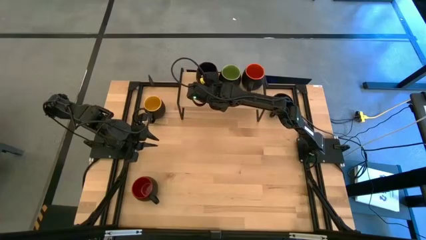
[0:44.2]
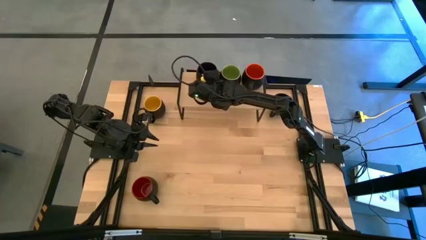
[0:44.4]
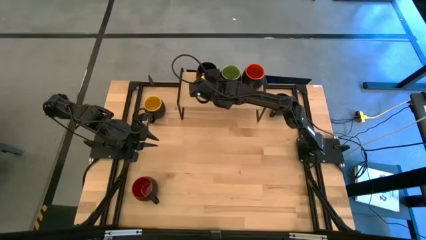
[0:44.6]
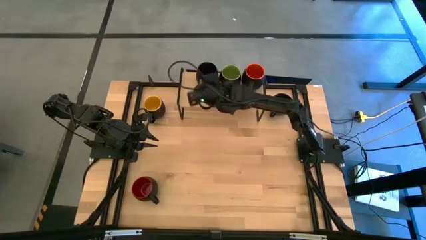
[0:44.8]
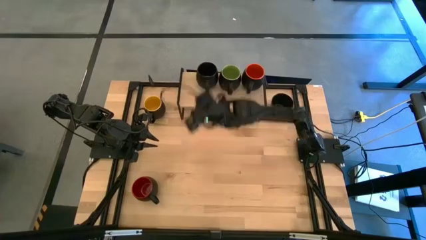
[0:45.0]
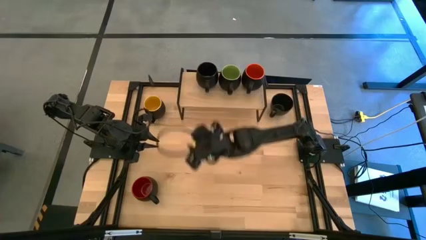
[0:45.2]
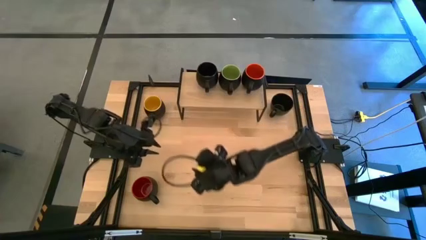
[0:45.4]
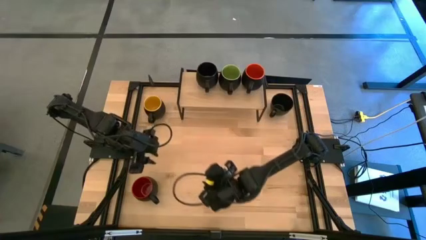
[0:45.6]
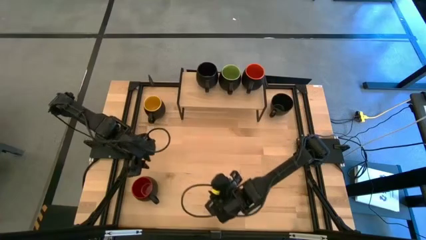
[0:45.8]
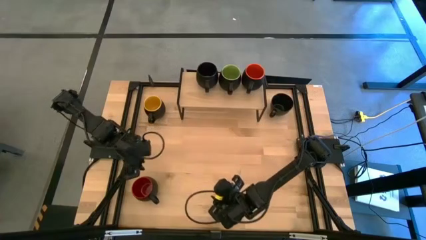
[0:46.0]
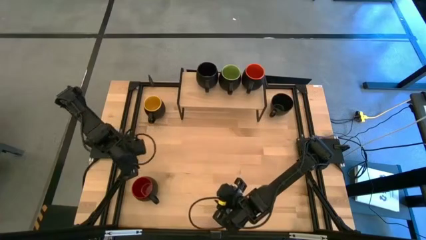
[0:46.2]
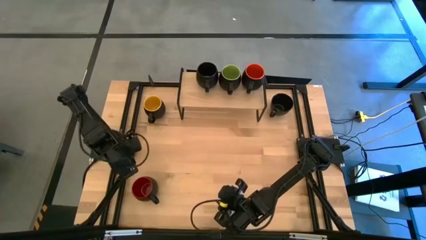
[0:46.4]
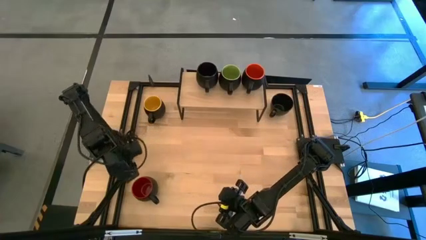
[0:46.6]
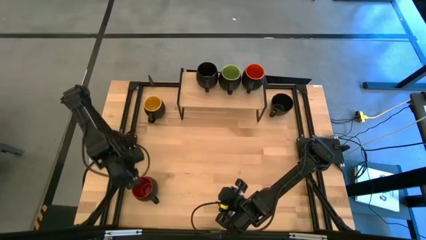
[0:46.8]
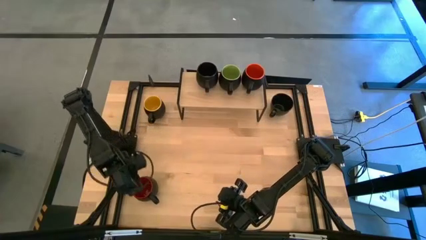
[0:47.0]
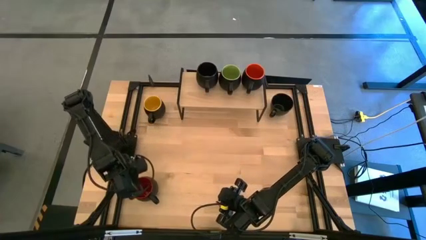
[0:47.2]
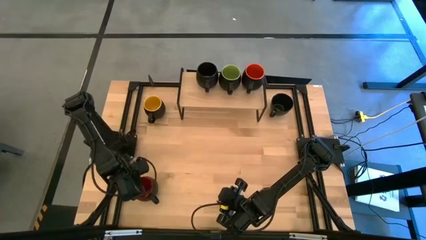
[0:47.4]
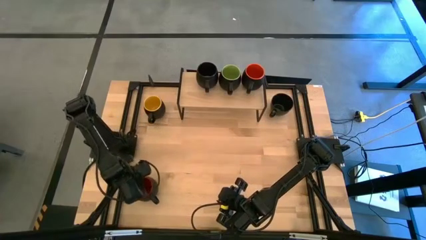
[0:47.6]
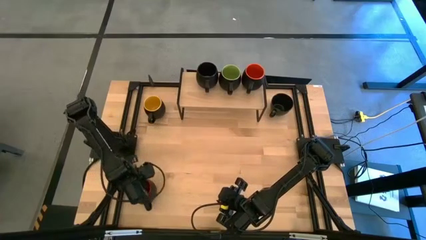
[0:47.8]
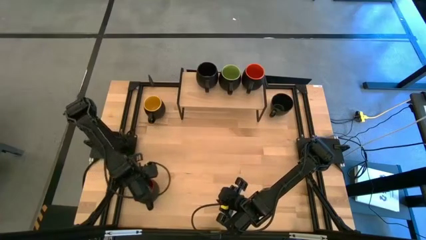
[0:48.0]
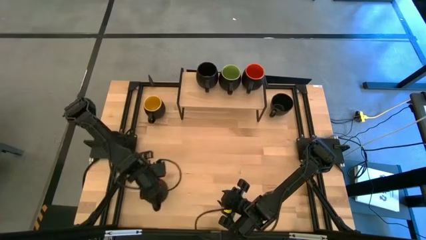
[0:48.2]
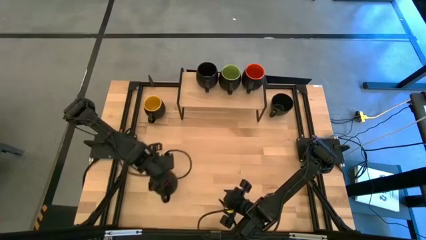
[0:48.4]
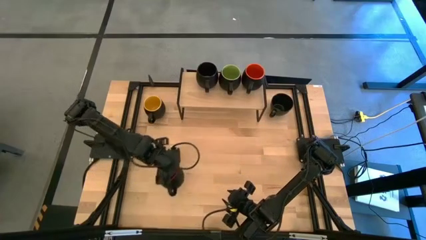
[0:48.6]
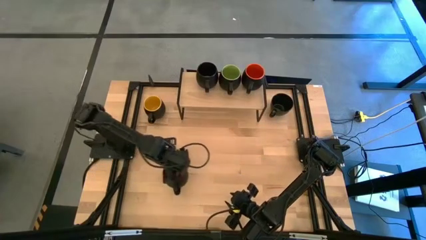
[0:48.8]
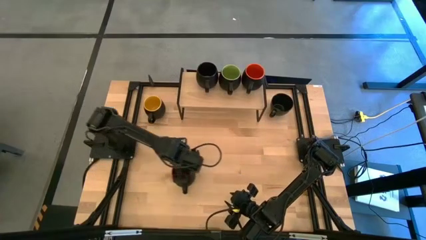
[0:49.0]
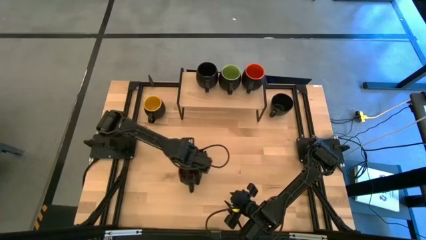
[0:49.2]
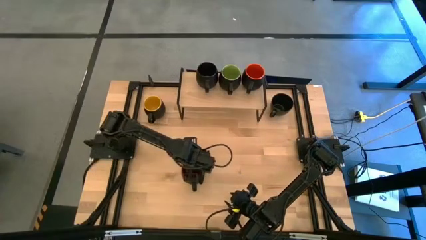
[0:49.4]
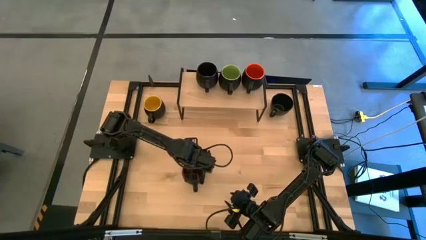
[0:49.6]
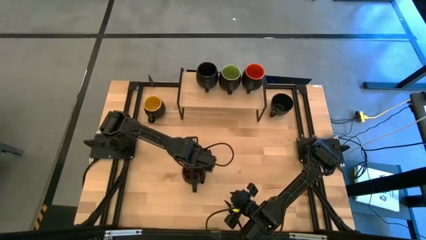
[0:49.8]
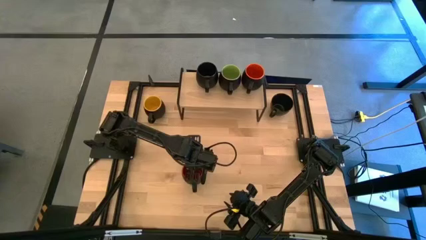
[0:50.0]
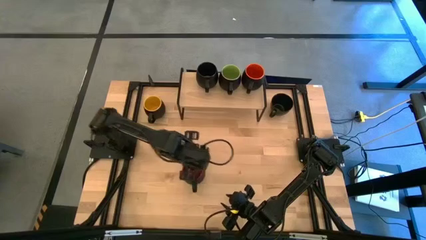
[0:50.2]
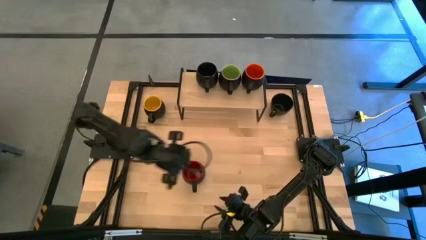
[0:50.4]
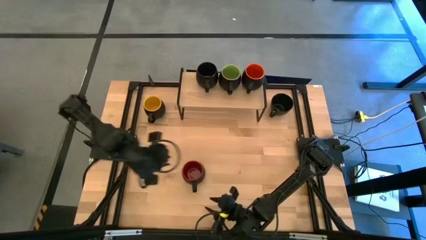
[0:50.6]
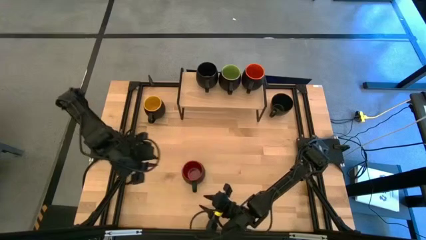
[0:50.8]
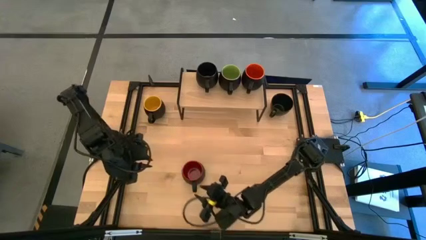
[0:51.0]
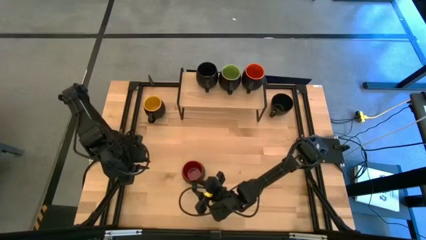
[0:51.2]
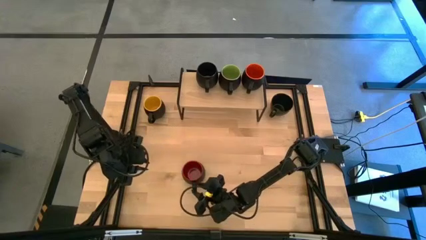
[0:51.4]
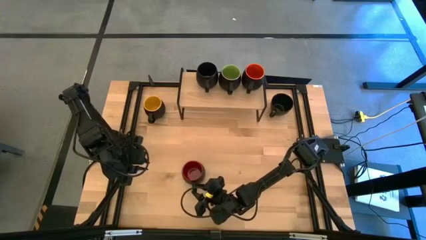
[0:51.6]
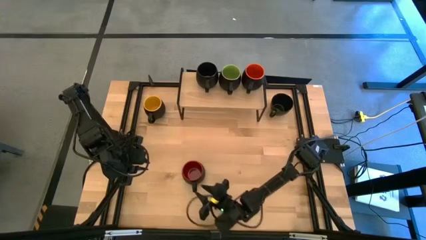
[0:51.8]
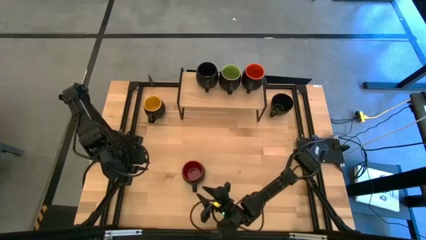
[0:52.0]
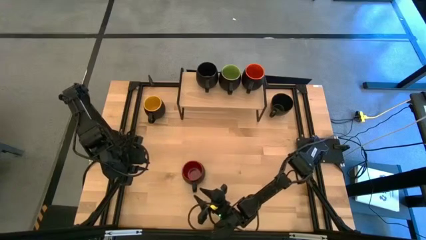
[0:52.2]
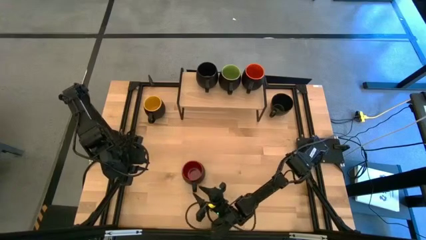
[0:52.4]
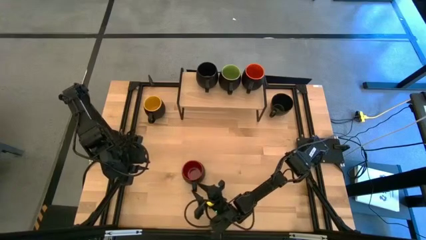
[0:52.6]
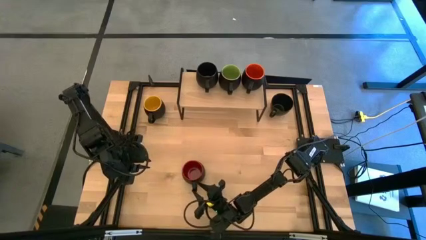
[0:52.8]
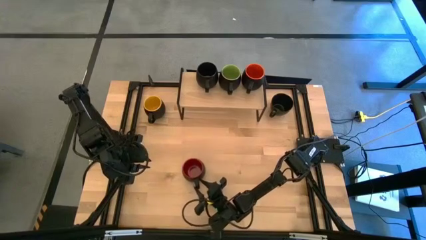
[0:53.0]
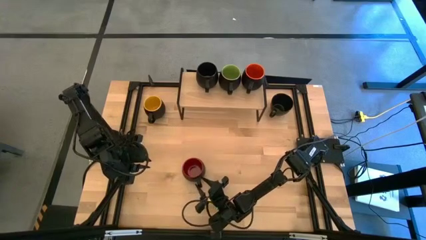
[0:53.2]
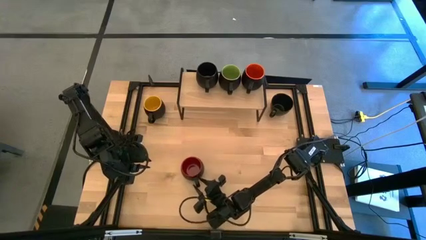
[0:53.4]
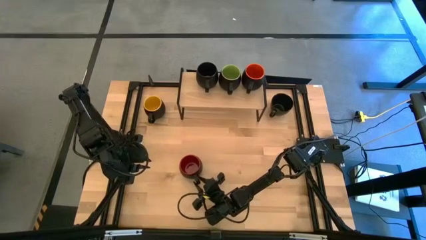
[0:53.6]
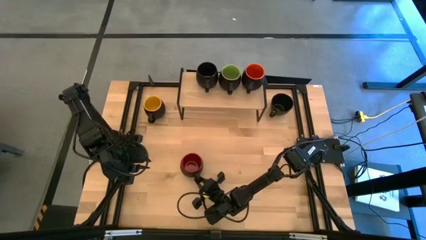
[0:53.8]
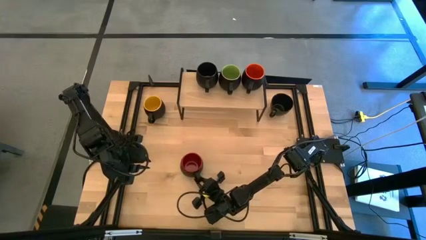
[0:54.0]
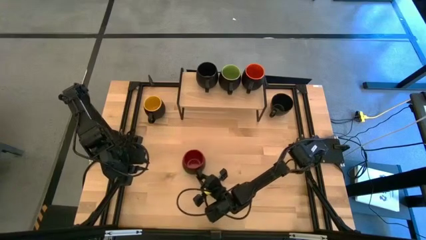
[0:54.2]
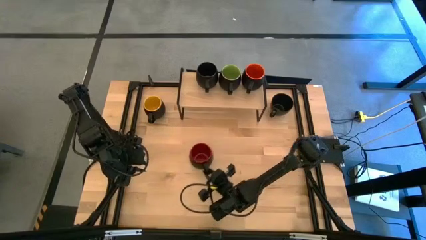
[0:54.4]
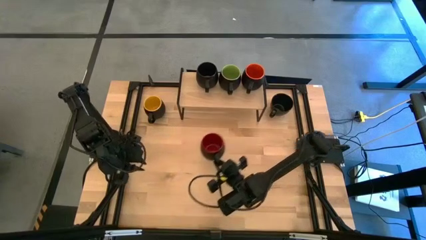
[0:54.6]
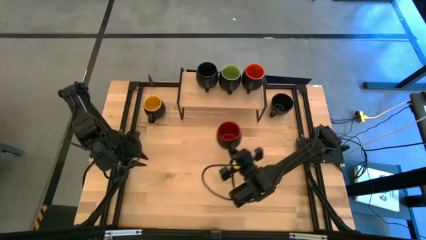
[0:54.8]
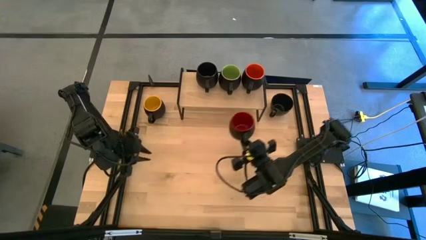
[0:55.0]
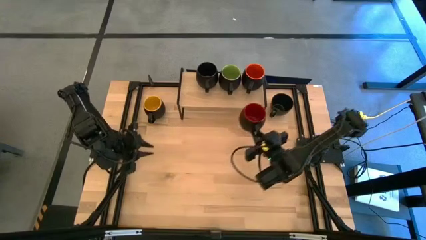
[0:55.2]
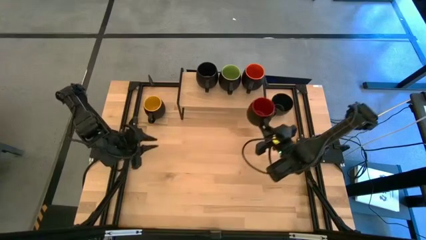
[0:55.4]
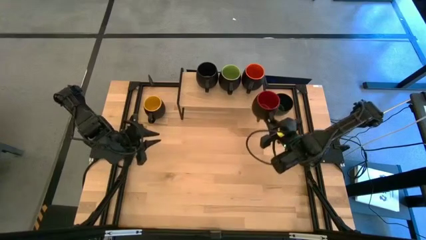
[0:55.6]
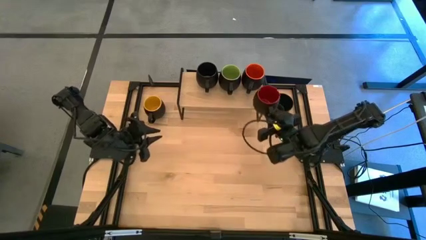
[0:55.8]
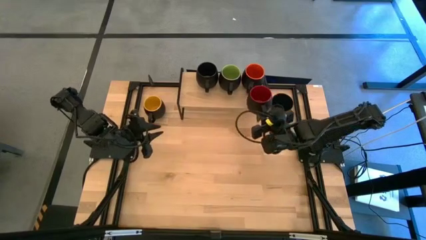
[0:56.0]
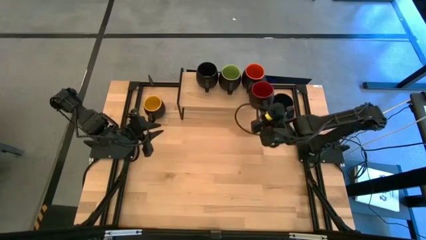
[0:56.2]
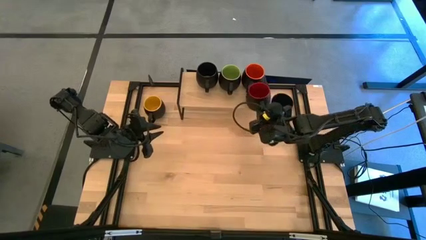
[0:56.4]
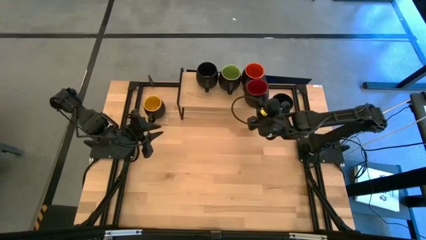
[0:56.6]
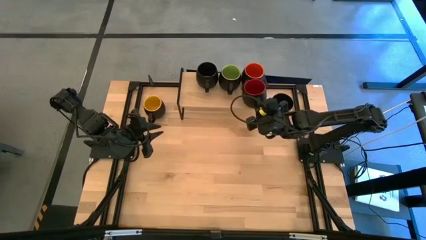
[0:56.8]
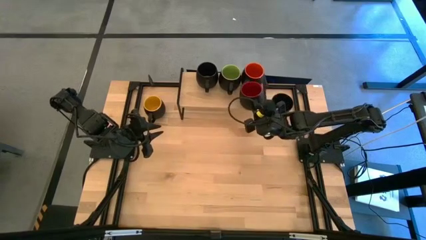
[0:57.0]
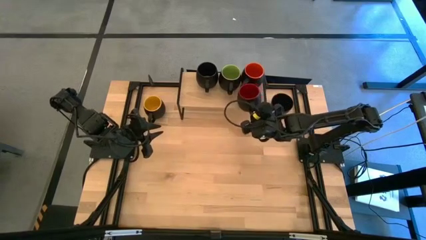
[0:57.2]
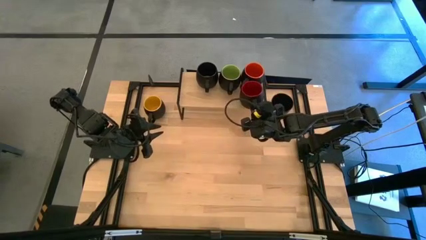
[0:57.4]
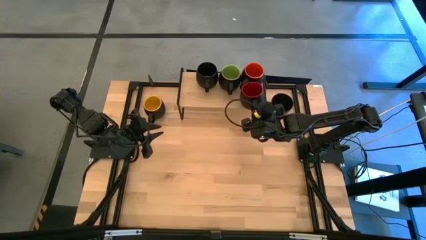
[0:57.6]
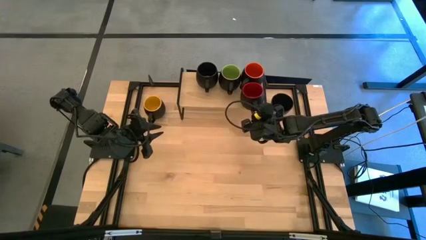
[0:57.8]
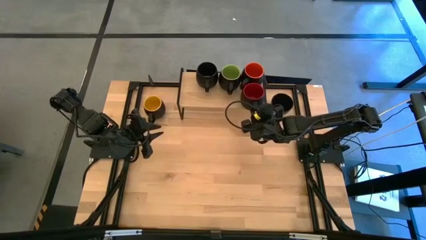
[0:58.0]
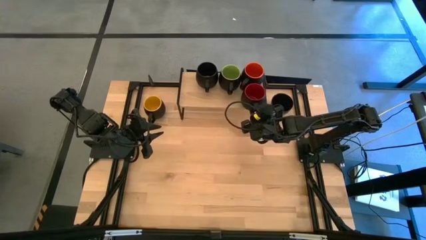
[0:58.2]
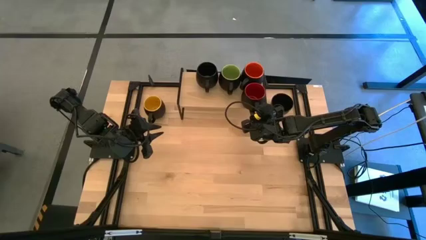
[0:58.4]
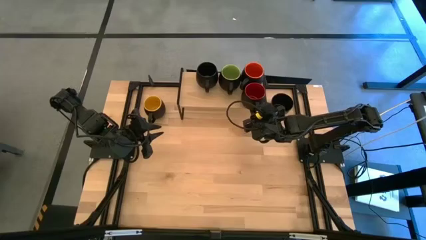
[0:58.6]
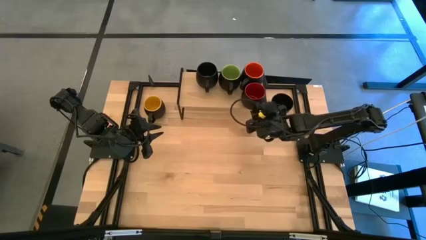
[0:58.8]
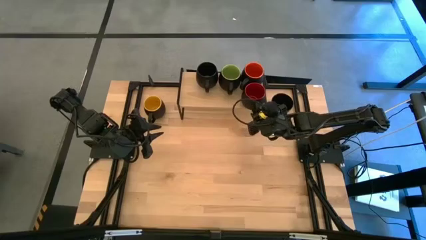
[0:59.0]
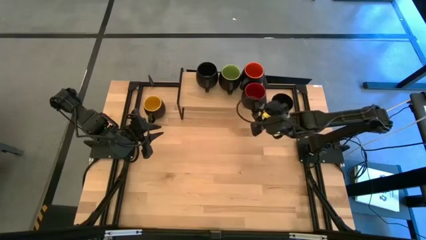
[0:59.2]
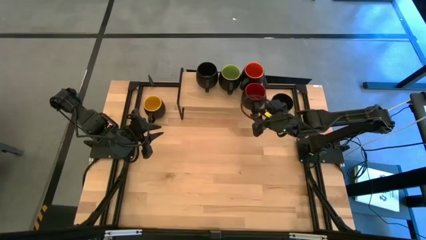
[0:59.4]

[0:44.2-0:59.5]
Task: Place coffee mugs
Put the red mug on the shelf

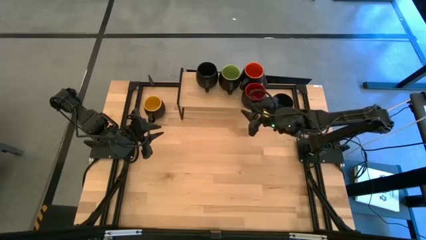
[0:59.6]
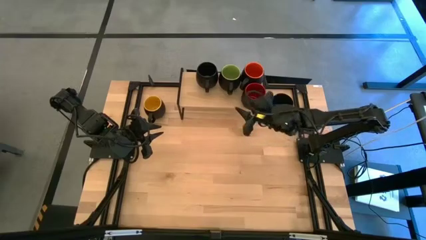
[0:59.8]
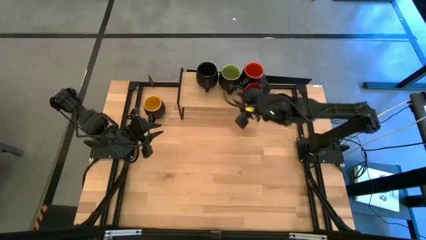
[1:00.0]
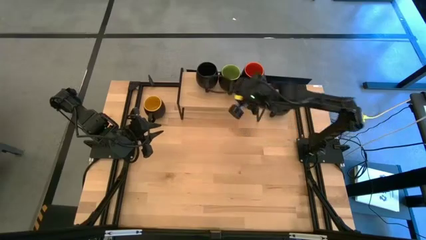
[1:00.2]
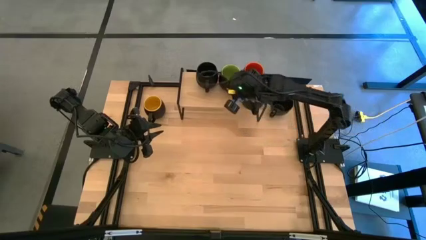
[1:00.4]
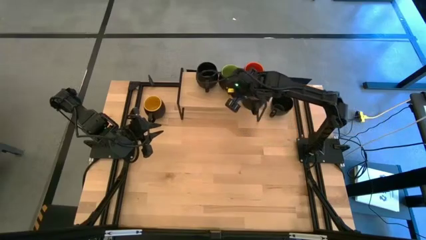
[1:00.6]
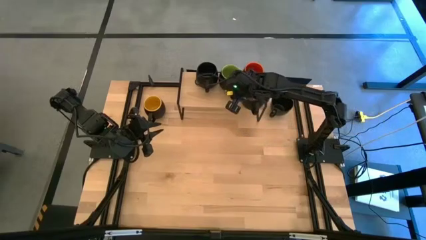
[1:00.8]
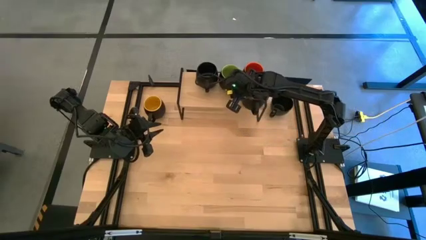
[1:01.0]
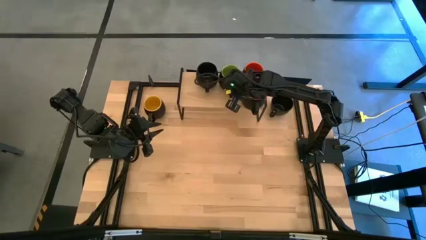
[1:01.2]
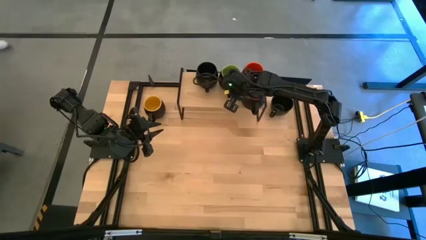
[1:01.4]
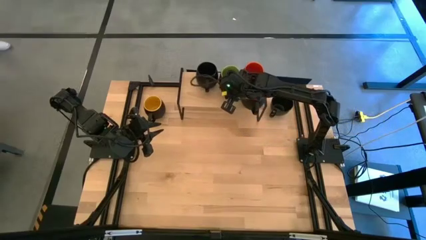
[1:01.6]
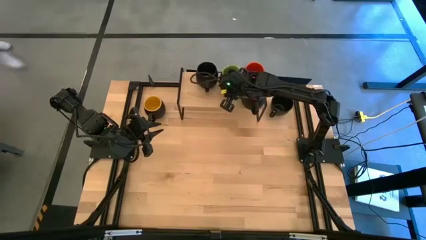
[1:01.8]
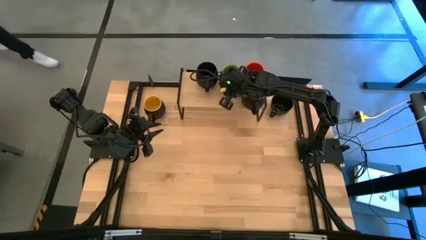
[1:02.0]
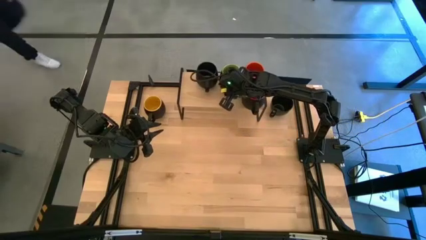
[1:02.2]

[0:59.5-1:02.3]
Adjust the green mug on the shelf
